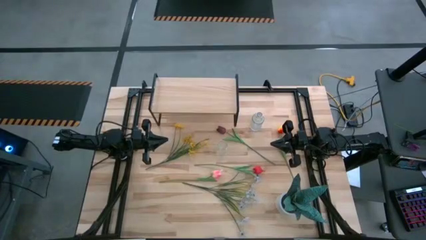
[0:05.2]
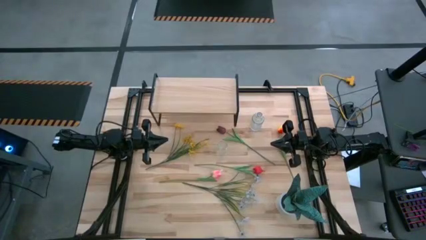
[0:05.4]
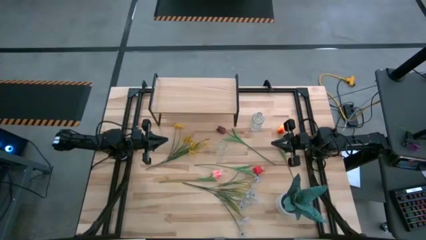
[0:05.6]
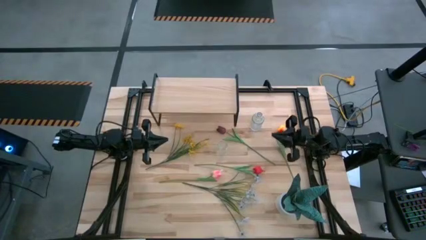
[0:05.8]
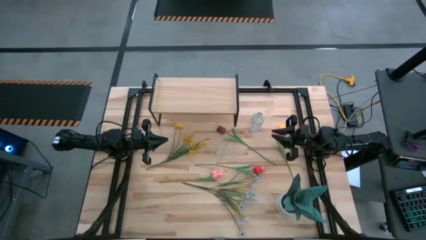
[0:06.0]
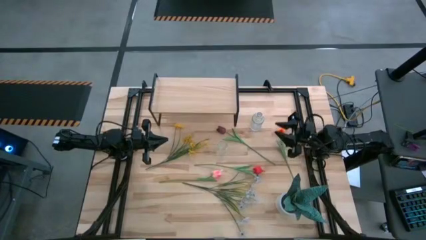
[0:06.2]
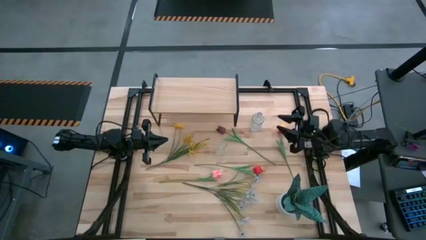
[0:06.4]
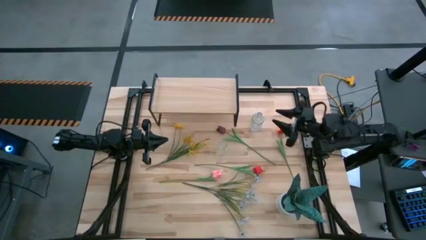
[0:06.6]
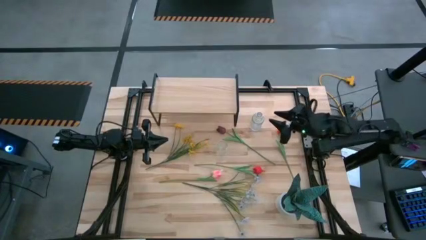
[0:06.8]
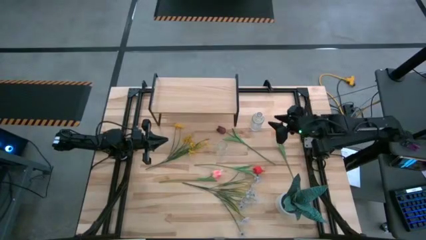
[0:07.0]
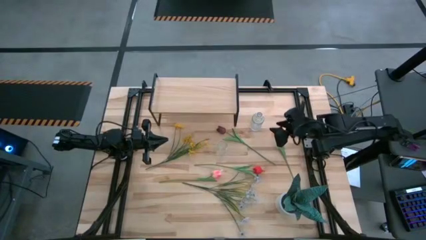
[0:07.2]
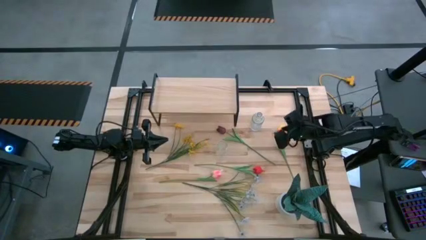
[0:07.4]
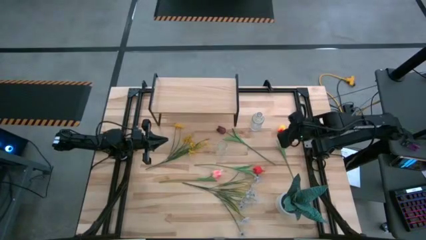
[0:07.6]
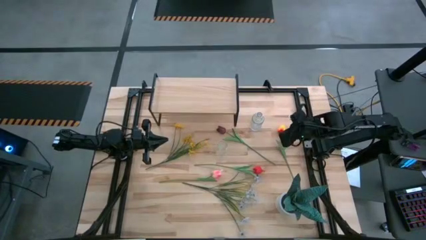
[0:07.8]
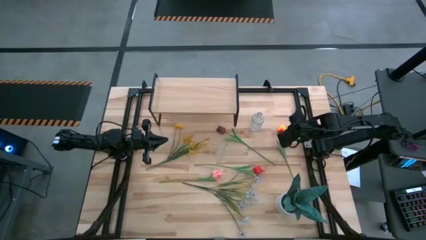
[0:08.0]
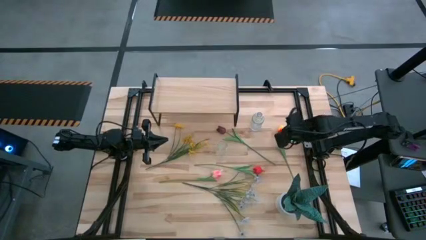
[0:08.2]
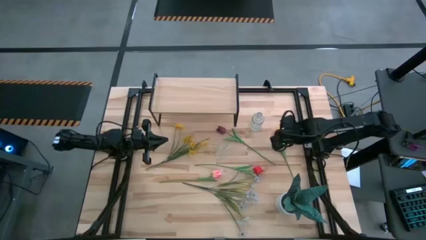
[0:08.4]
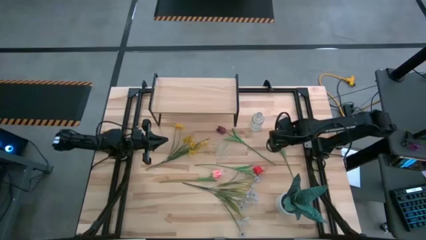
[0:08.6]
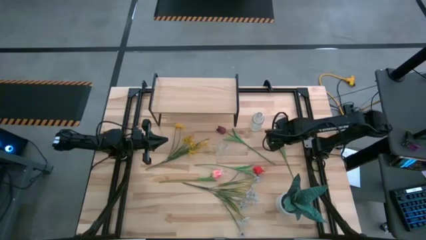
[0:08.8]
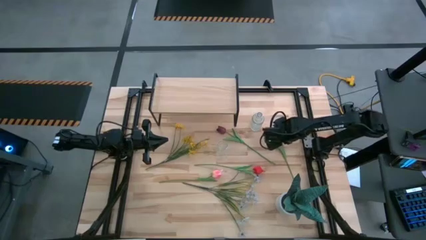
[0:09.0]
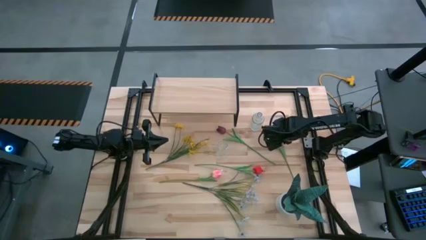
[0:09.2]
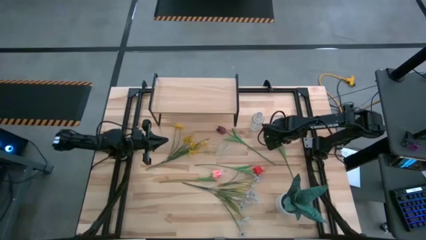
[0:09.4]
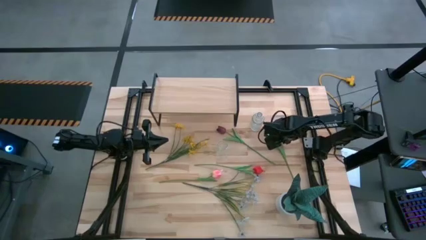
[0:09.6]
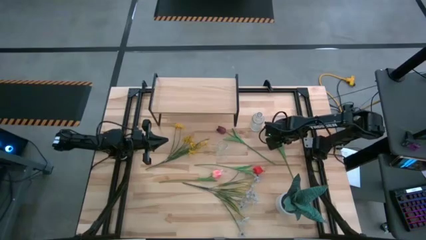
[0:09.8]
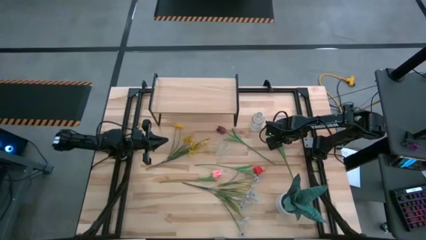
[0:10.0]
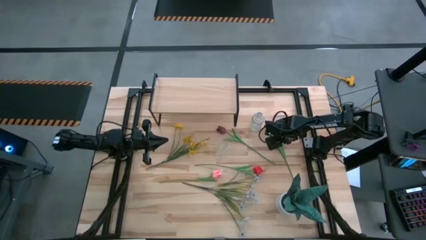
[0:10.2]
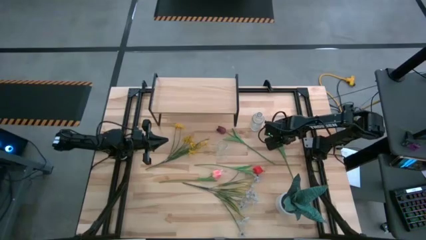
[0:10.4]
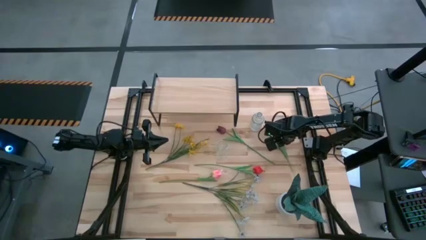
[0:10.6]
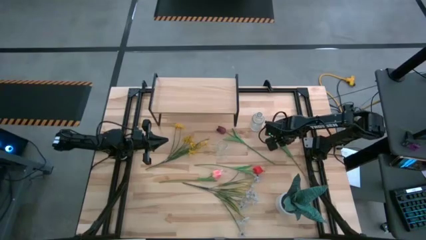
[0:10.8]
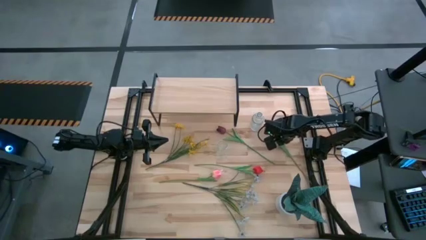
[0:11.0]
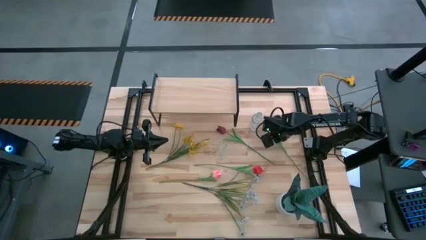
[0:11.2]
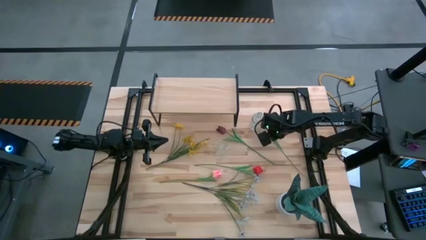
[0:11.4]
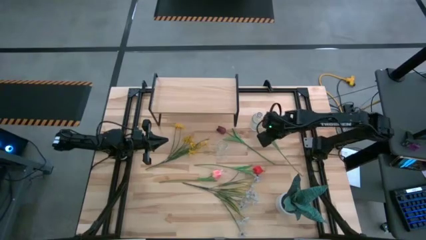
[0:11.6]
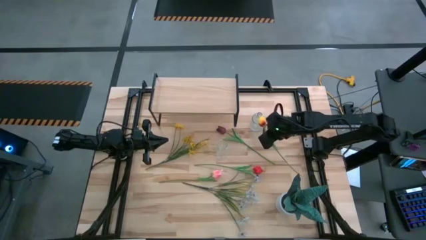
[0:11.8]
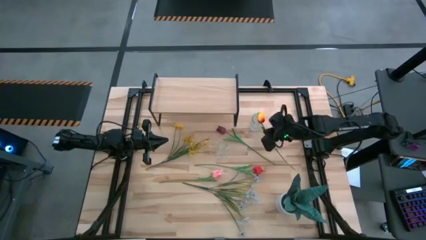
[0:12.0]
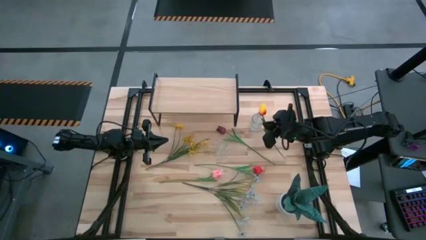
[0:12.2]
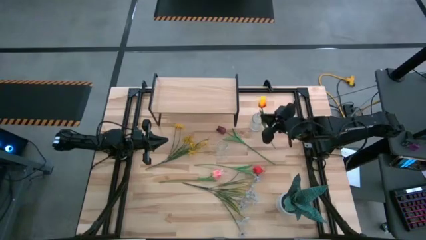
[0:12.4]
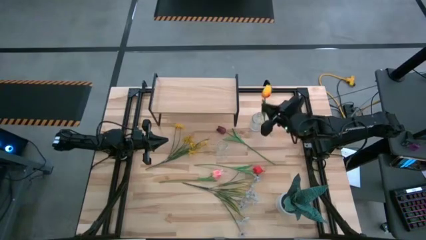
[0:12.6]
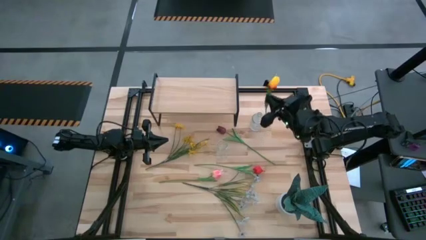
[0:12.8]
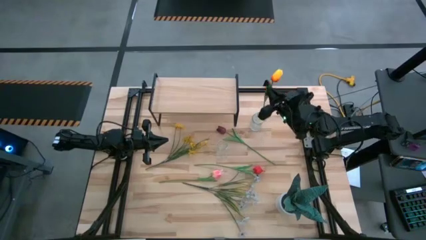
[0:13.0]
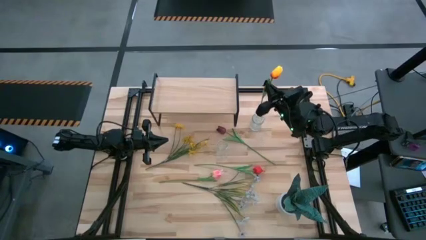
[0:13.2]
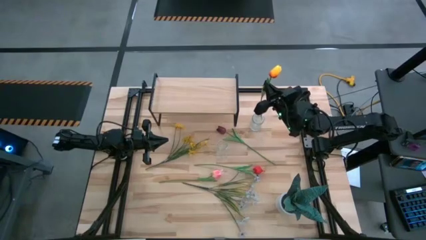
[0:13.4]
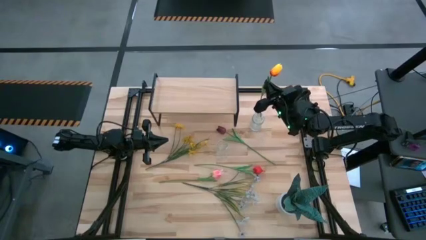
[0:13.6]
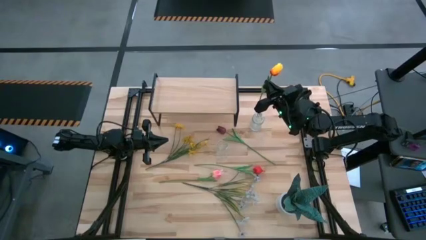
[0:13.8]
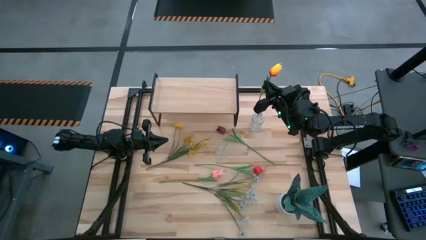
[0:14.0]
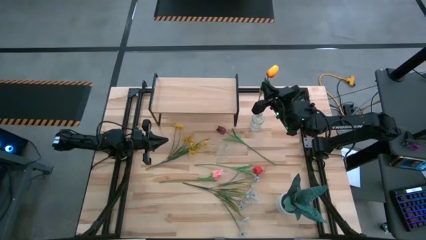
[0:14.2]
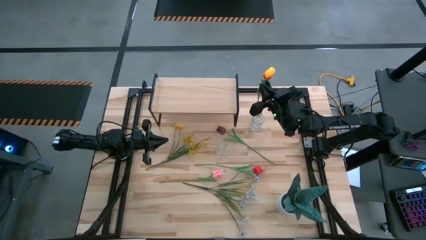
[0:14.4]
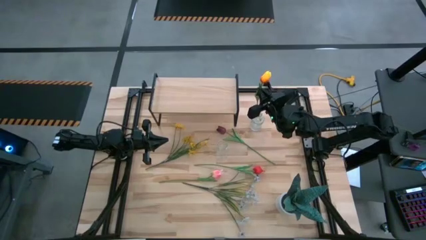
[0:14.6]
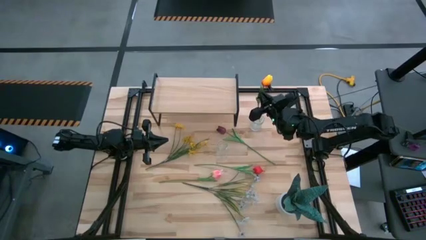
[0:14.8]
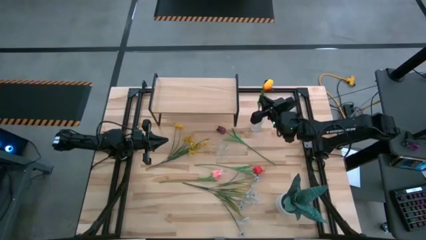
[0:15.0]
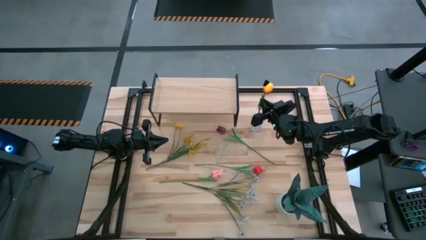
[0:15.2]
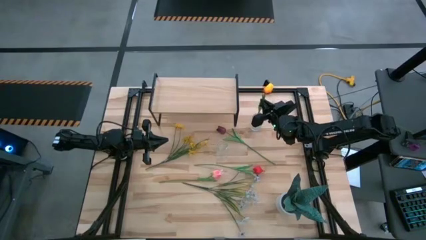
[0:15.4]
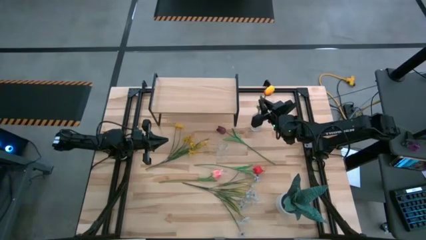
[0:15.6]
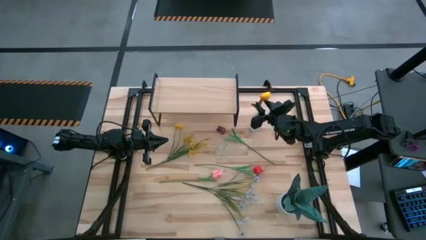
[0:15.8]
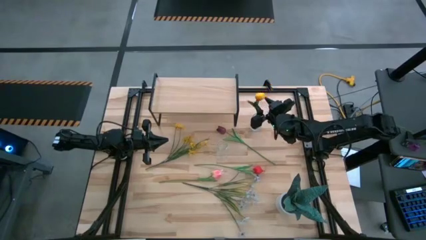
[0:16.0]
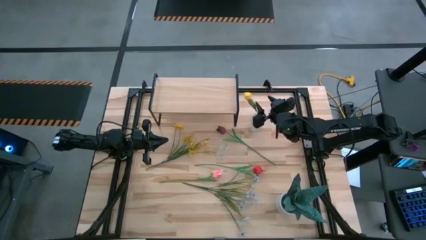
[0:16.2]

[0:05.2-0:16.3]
Task: Pick and place flowers into a vace then onto a shelf
Put the yellow tulip into the top transparent vase
